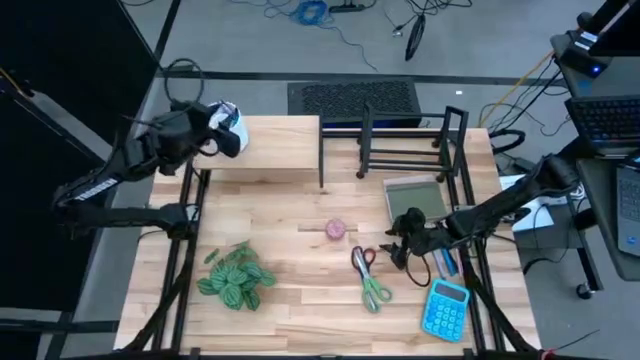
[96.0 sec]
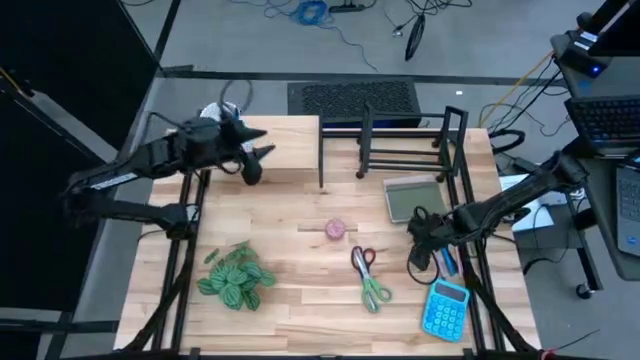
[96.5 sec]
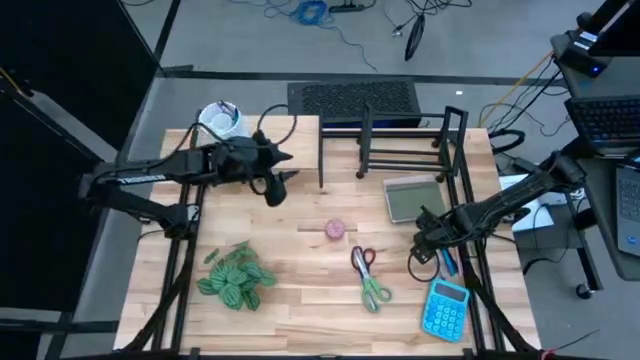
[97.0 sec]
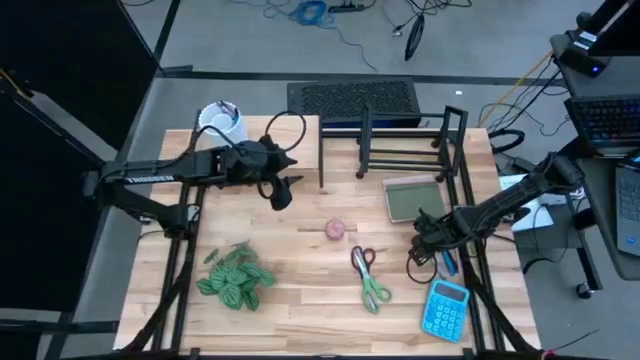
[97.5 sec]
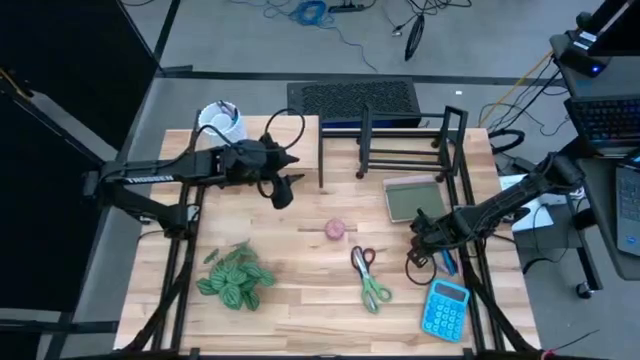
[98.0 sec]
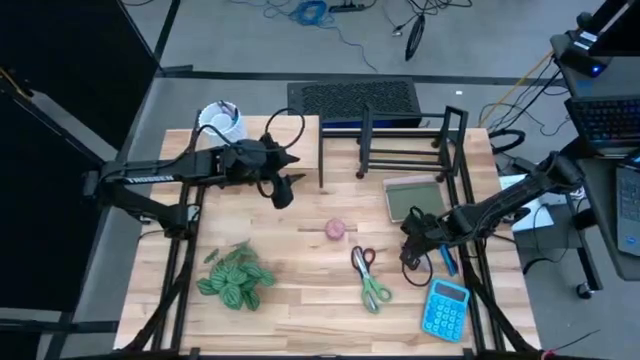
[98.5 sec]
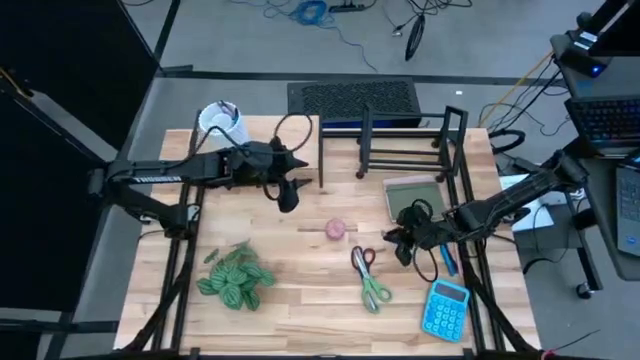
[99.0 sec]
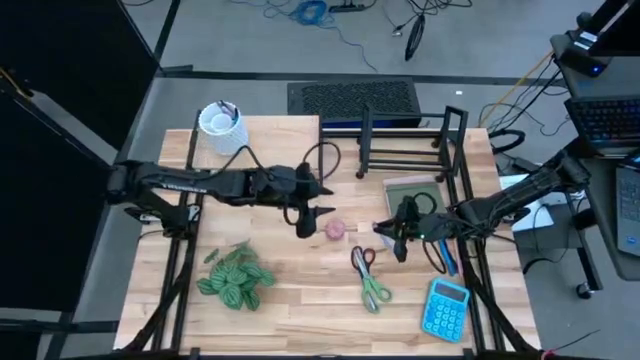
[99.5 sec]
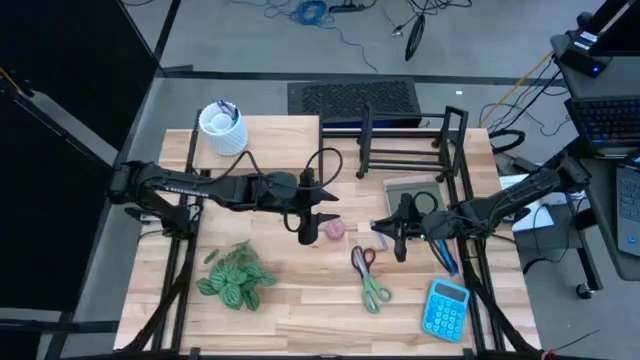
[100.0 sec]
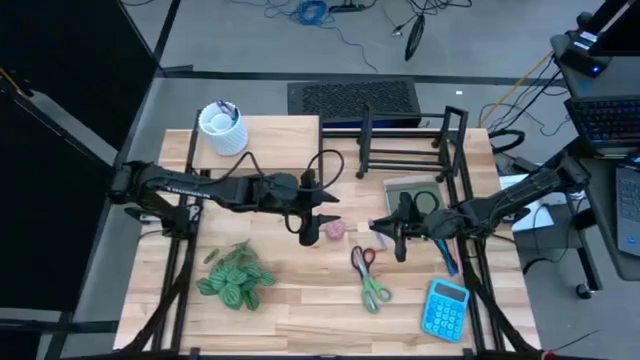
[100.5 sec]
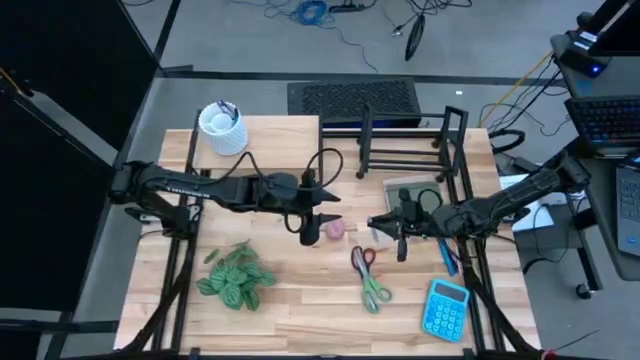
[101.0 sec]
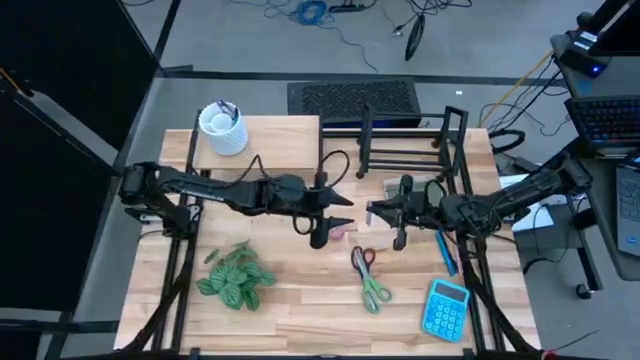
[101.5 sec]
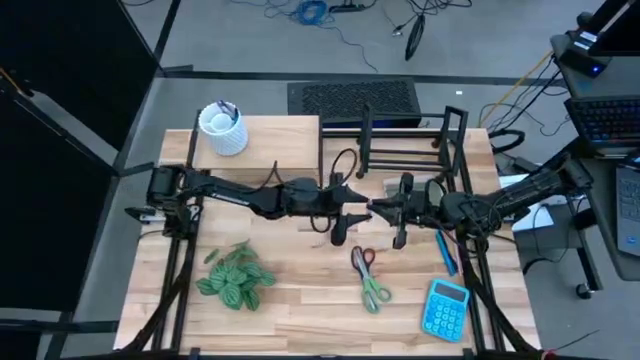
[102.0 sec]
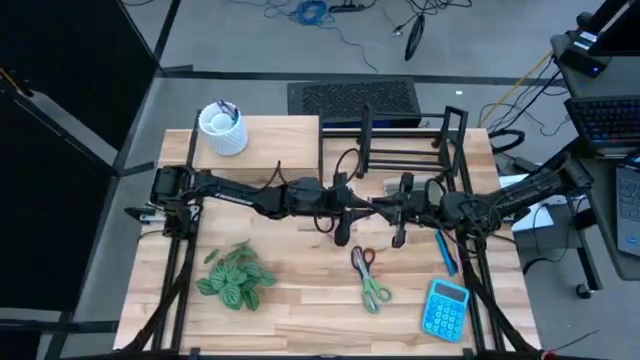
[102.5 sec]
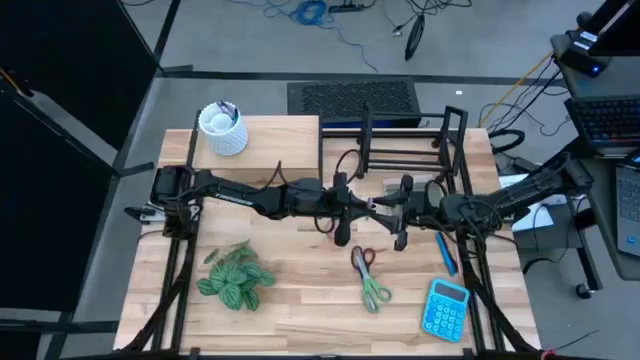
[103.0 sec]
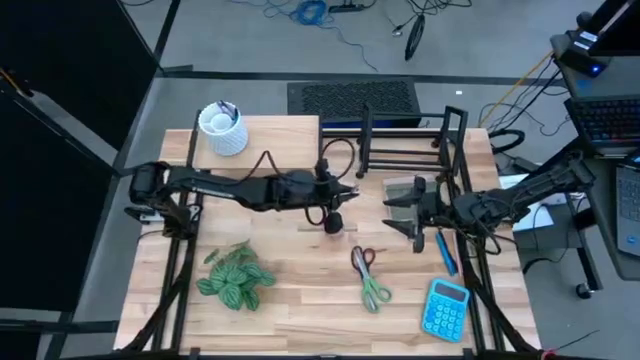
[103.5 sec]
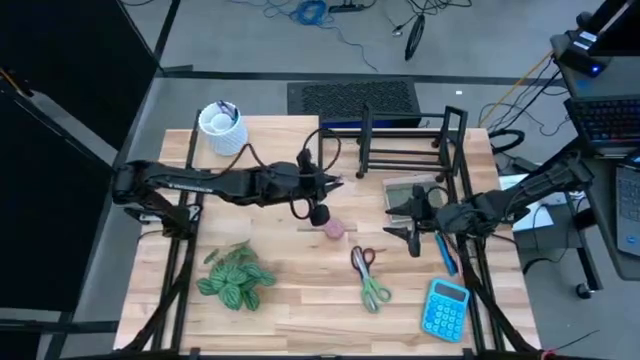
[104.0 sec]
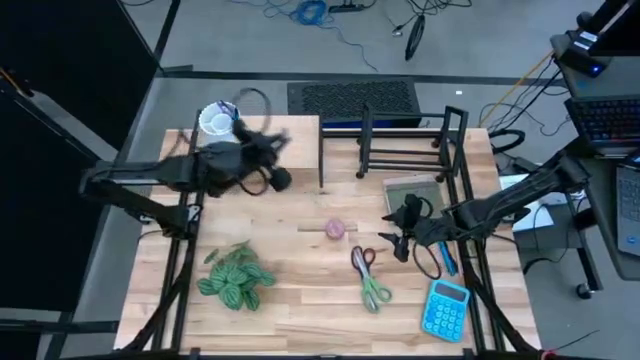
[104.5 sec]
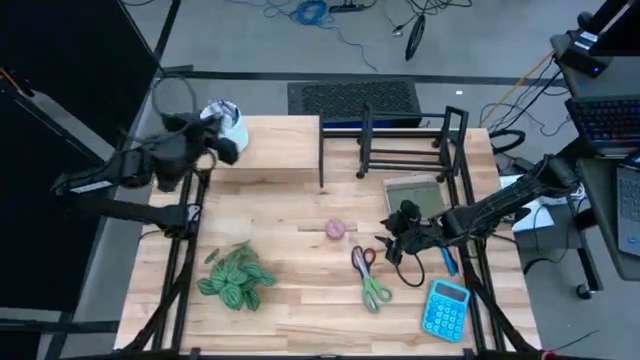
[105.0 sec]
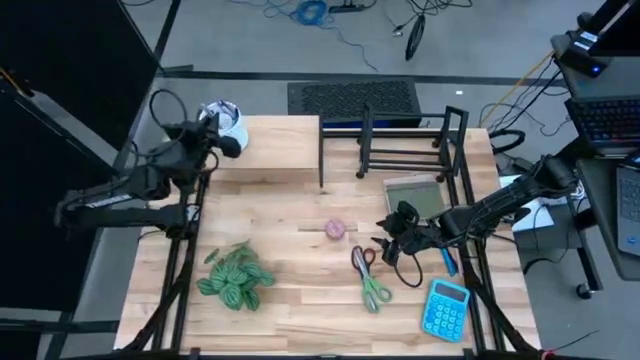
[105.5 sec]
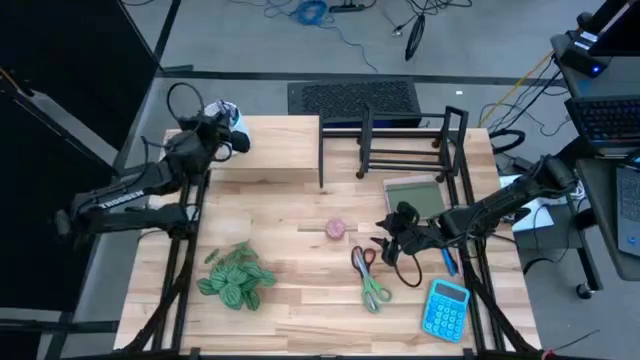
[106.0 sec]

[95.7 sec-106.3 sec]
Task: Stock shelves
Put the purple pen into the white pen holder

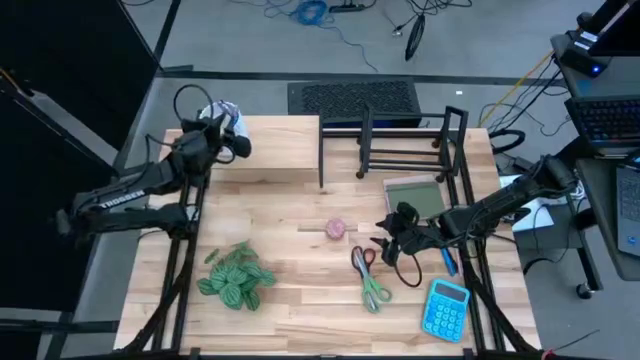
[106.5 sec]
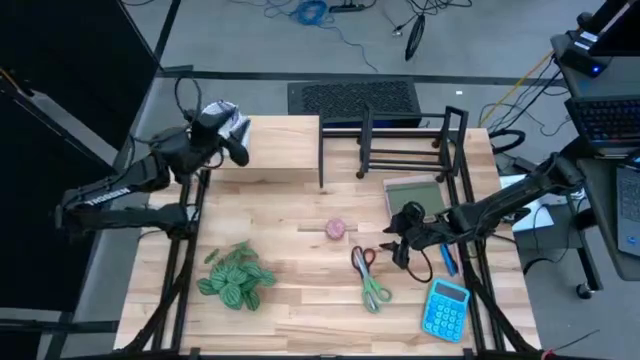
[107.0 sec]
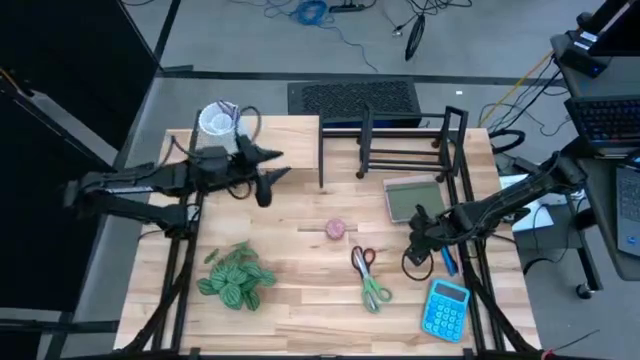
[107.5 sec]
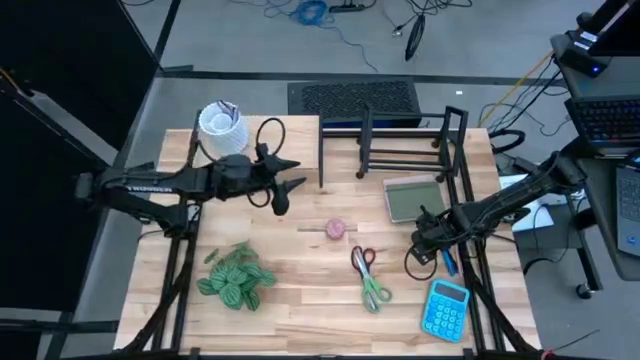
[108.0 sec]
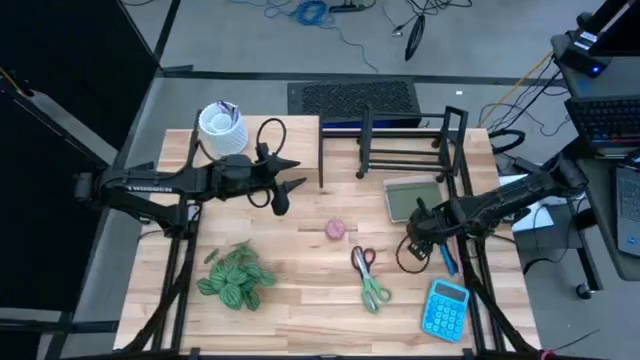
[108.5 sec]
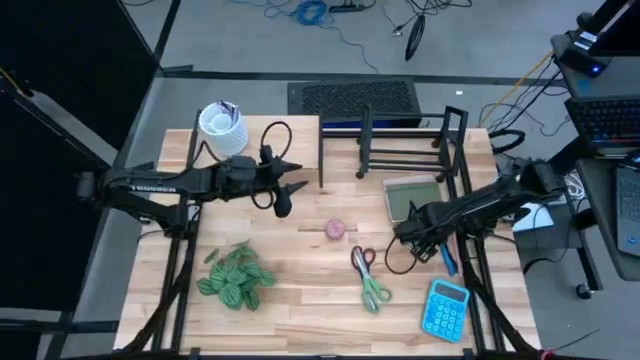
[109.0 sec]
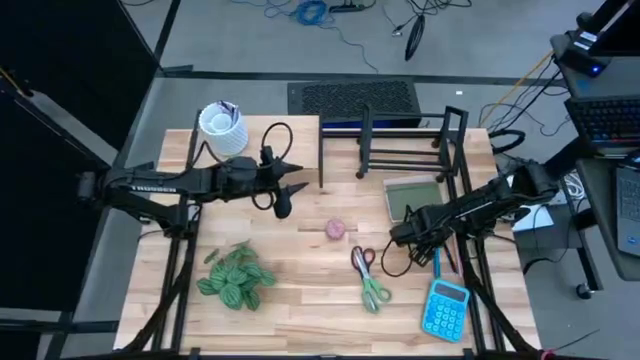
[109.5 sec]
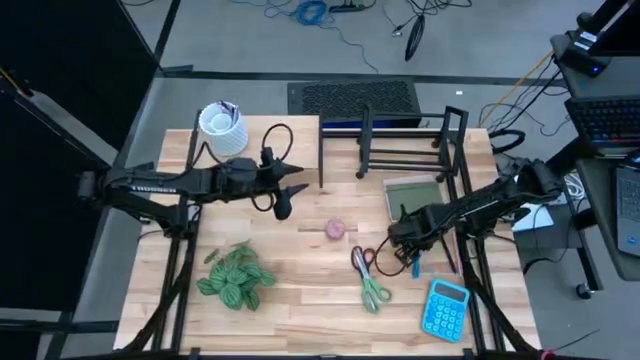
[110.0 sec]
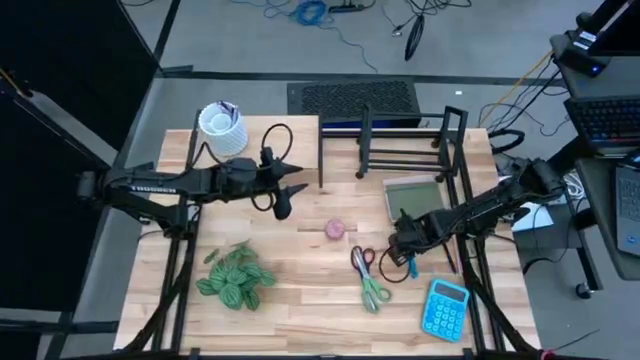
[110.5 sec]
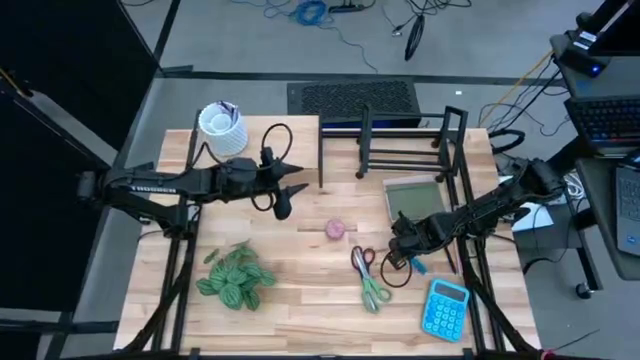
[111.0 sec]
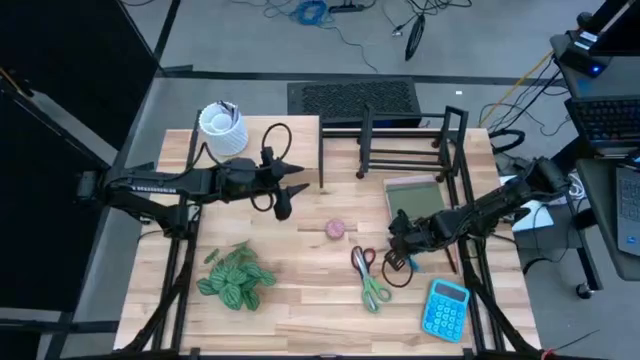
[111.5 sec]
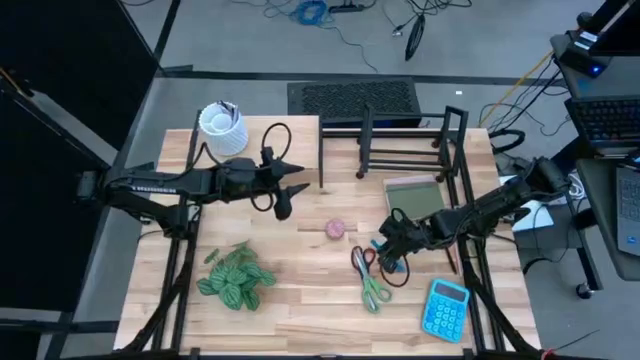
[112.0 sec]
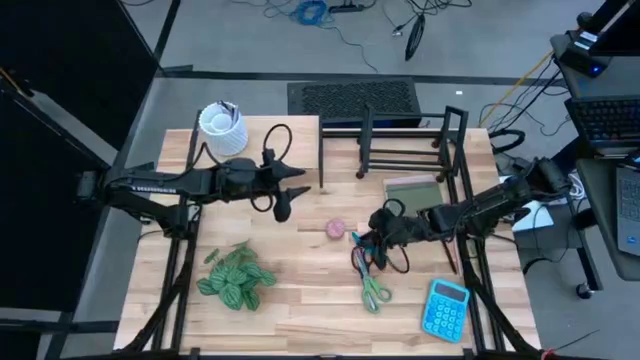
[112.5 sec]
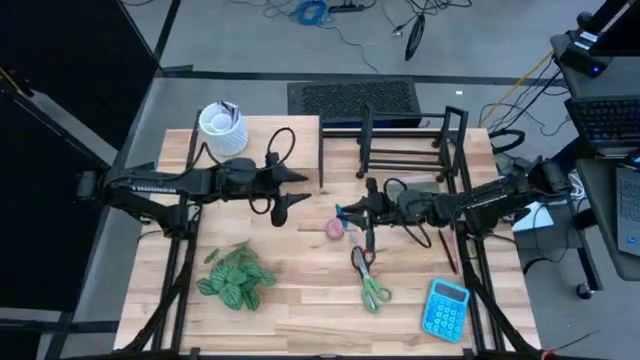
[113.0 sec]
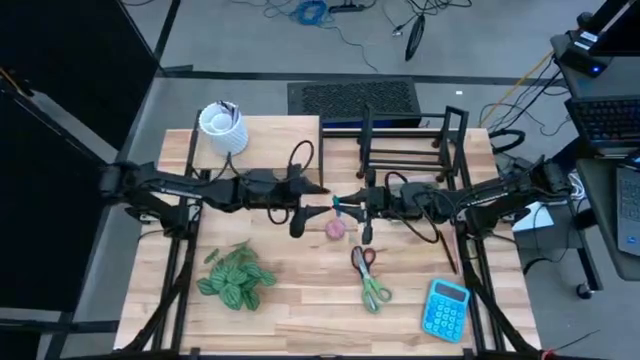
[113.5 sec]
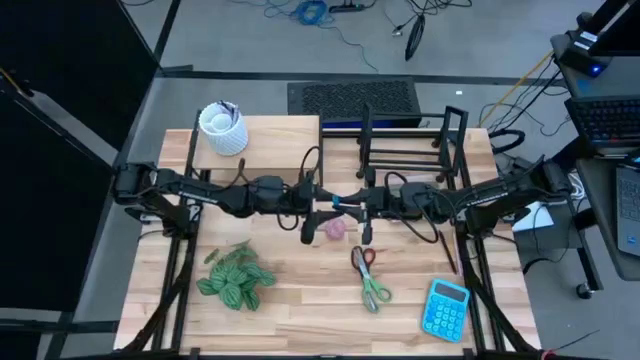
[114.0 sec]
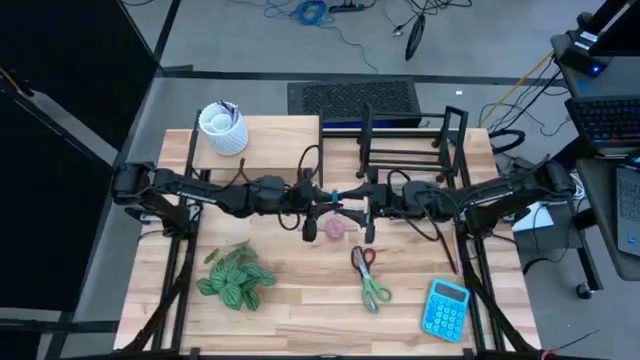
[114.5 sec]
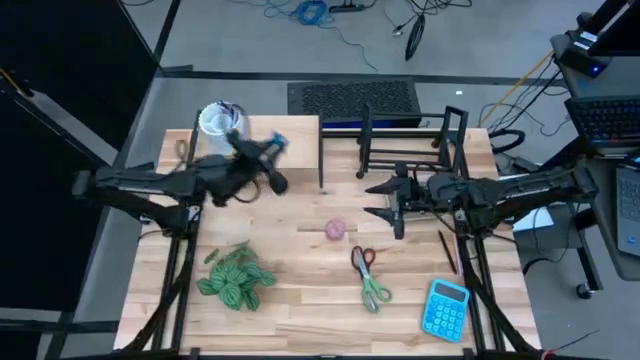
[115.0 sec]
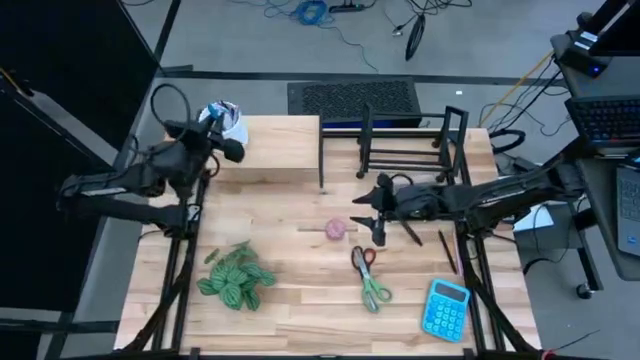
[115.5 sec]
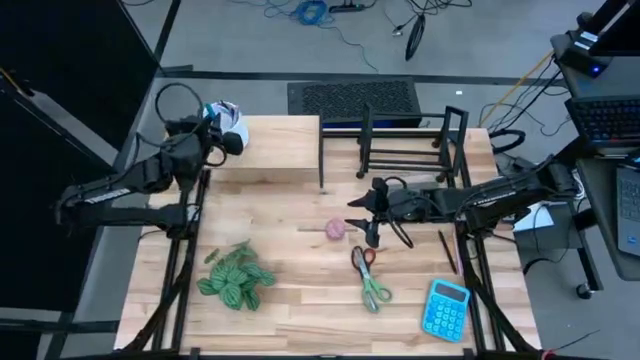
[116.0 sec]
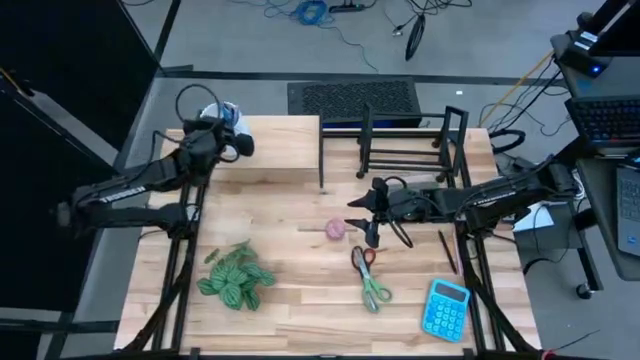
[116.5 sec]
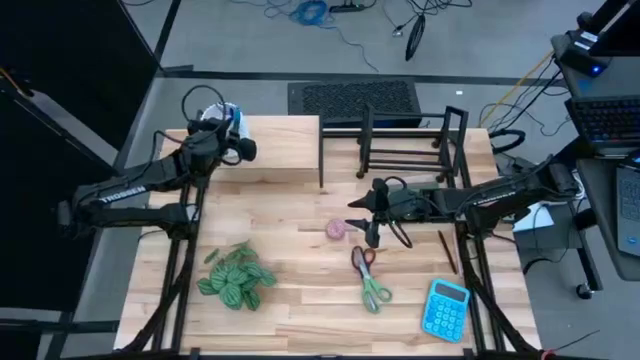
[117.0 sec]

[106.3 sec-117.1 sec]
Put the blue pen into the white pen holder
